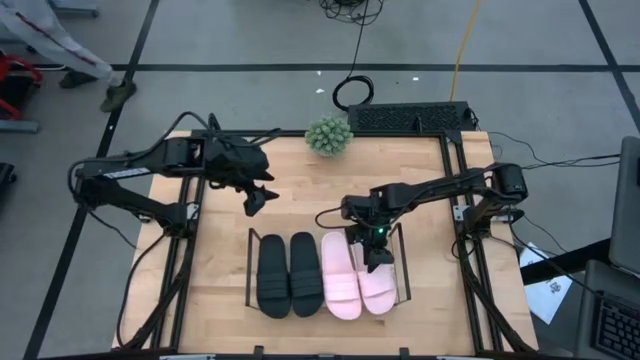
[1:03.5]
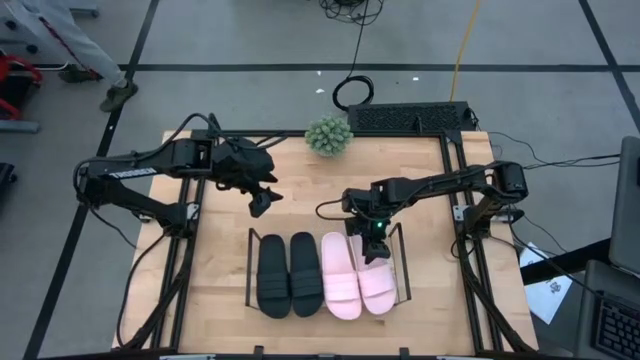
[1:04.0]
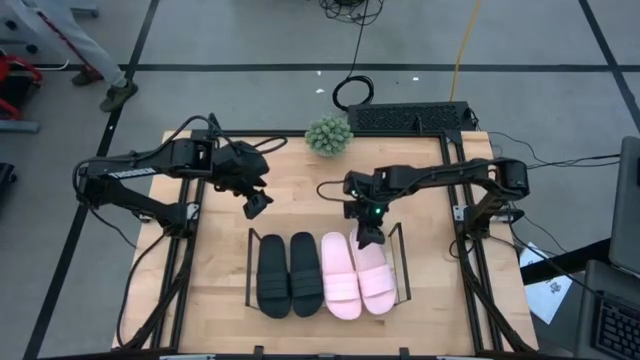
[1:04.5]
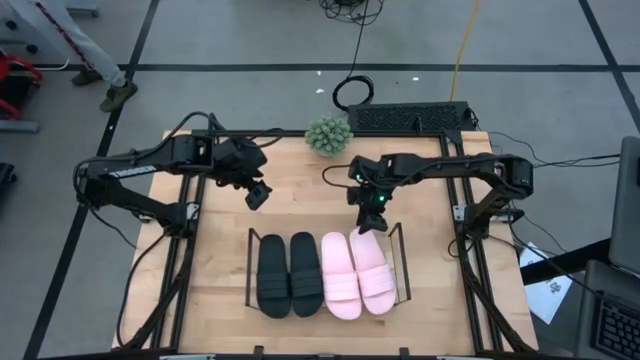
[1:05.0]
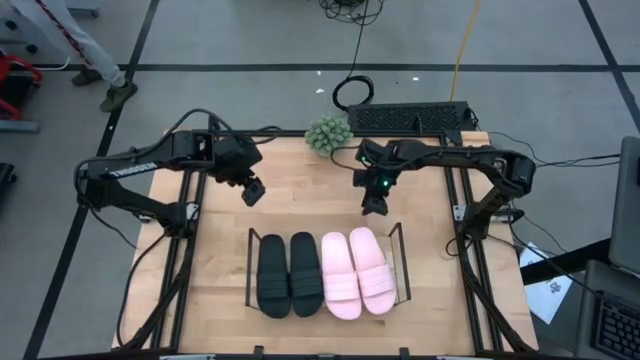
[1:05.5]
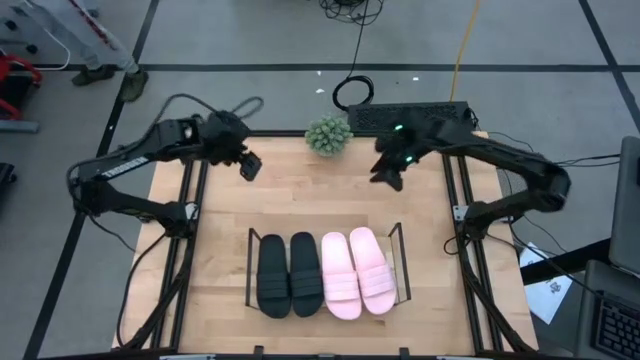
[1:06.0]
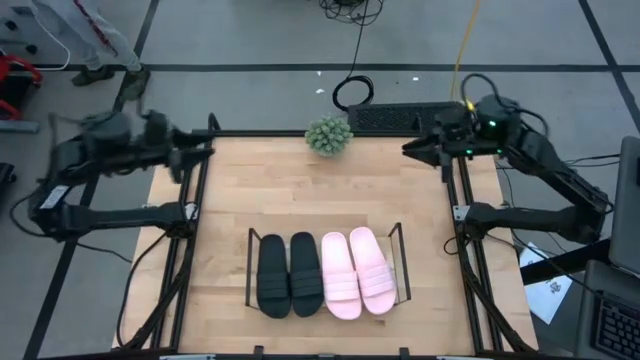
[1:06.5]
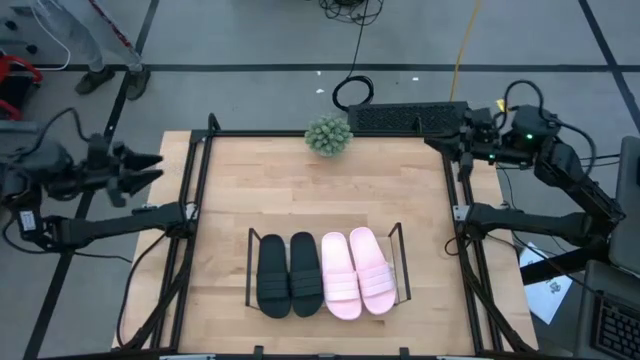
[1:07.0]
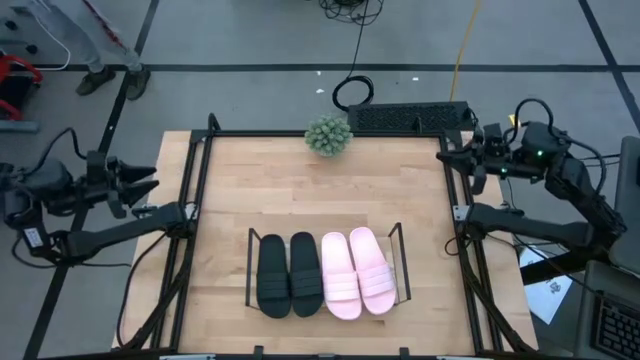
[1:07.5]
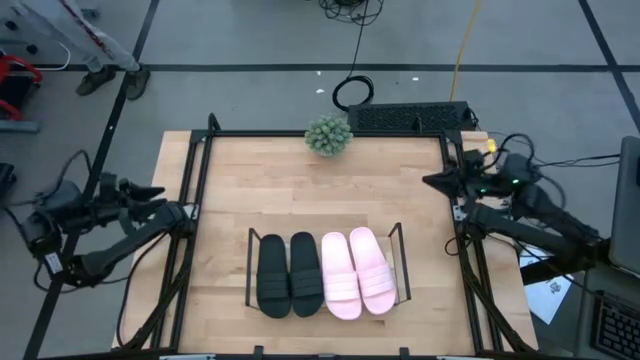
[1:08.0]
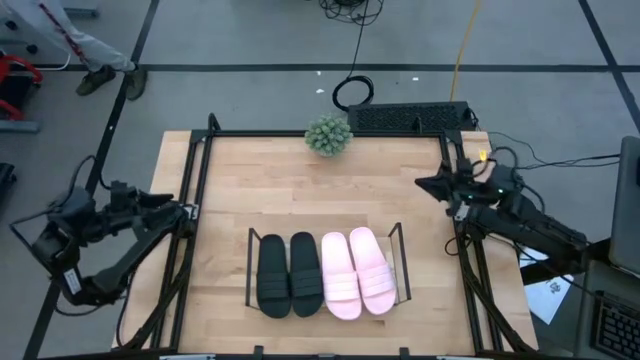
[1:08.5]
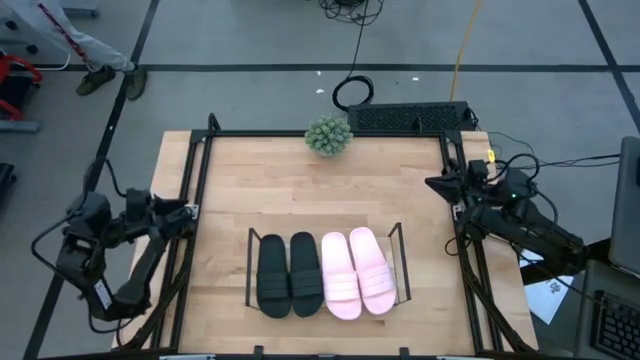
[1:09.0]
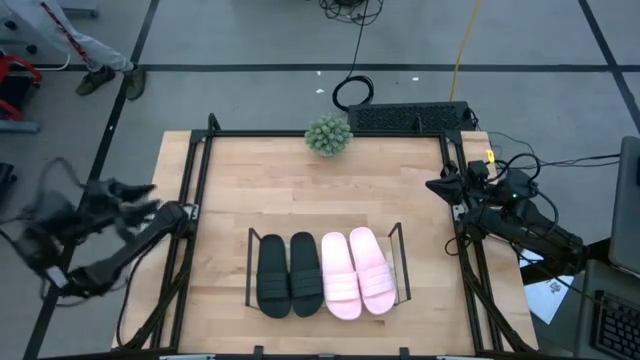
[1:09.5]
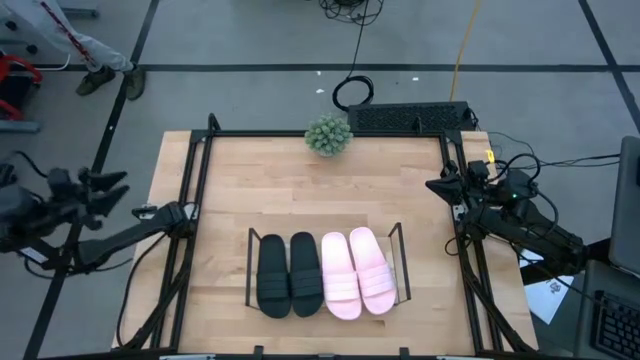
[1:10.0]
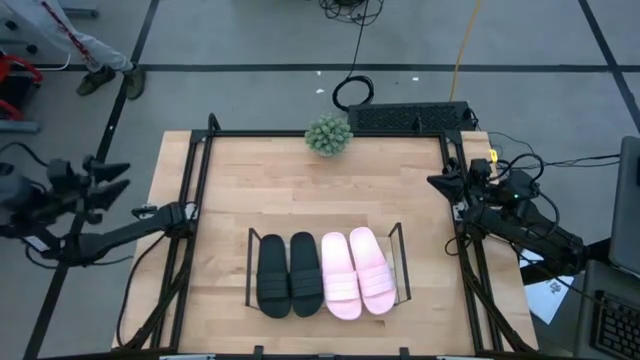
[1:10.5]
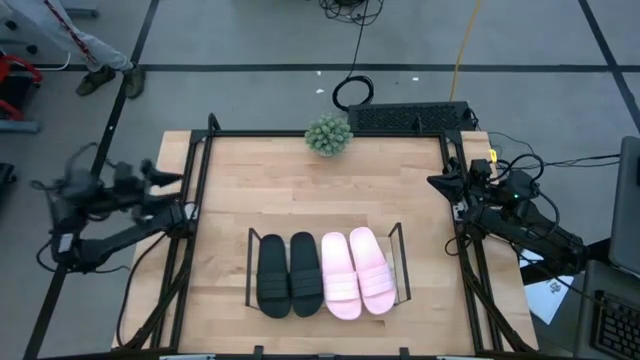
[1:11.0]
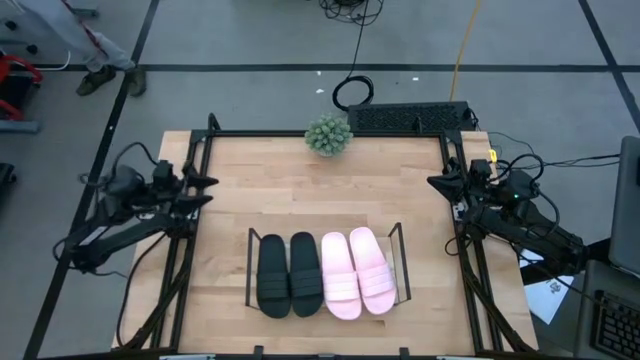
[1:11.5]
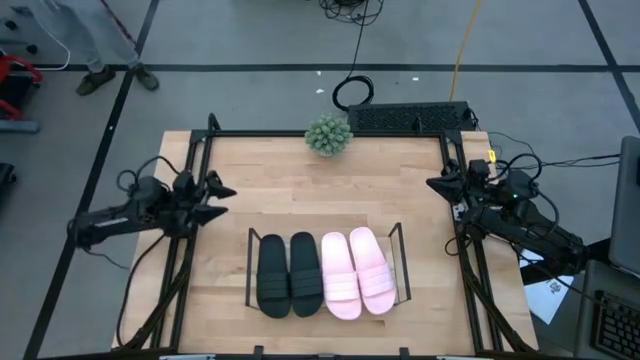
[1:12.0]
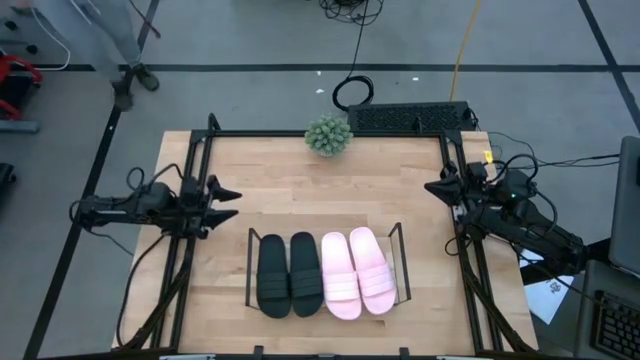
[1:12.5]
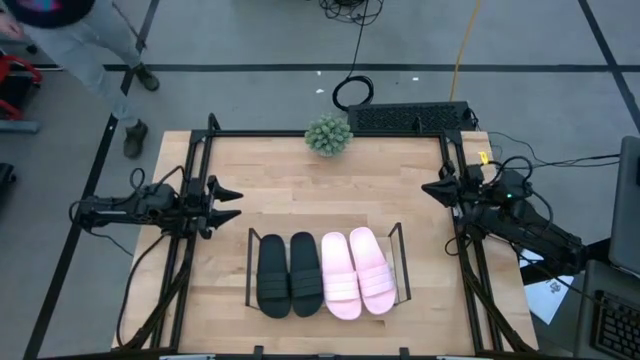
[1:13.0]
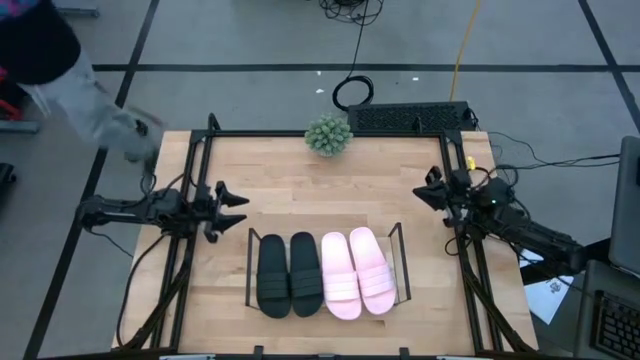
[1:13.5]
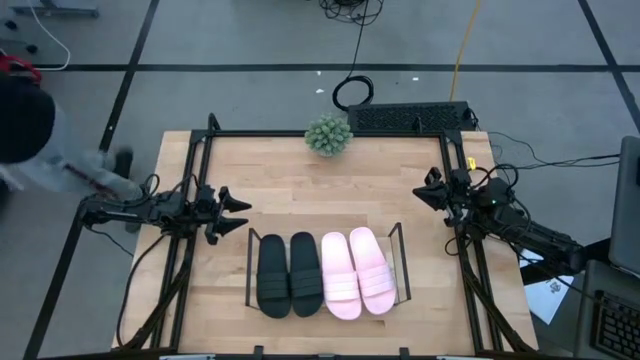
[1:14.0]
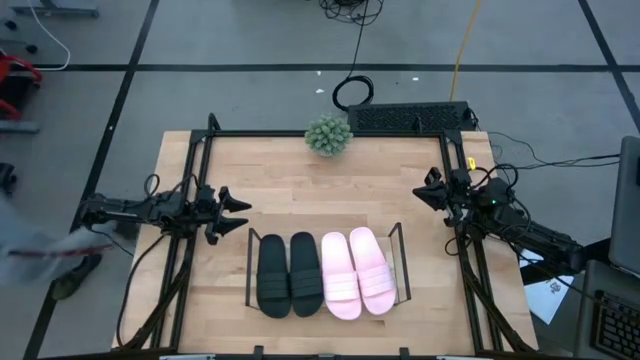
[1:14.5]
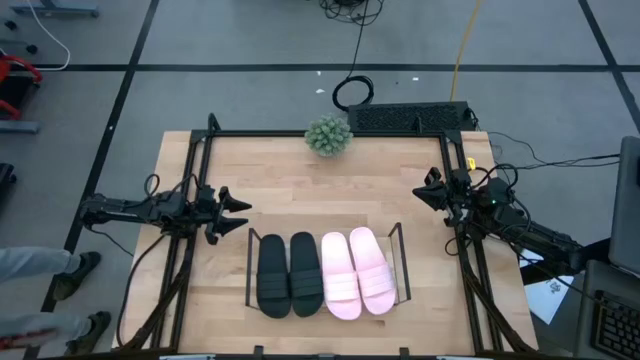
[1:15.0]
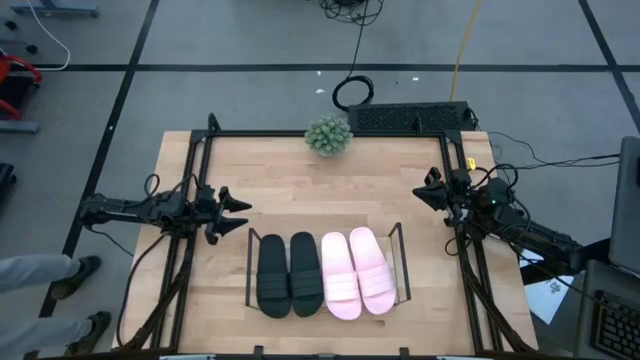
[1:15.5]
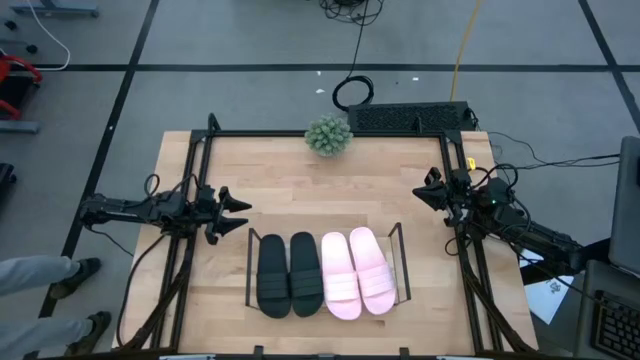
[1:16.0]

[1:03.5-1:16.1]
Task: Pick and place slides into the shelf
Return to Home Position

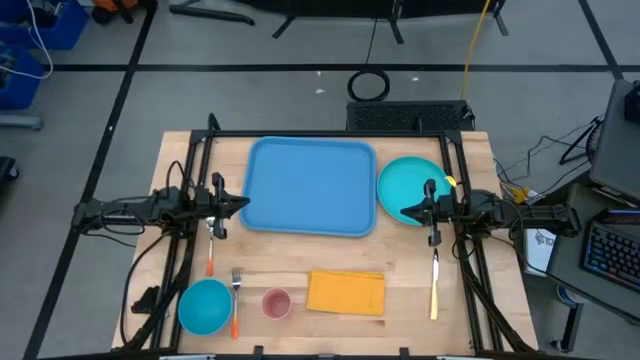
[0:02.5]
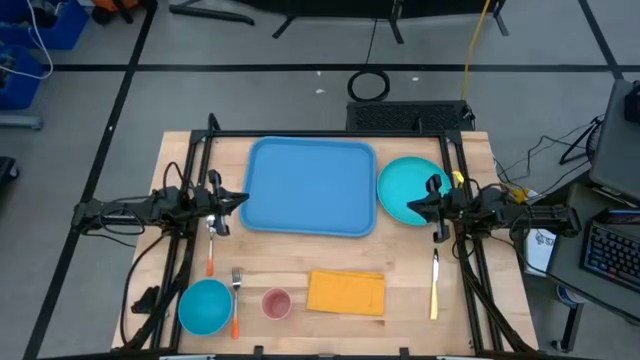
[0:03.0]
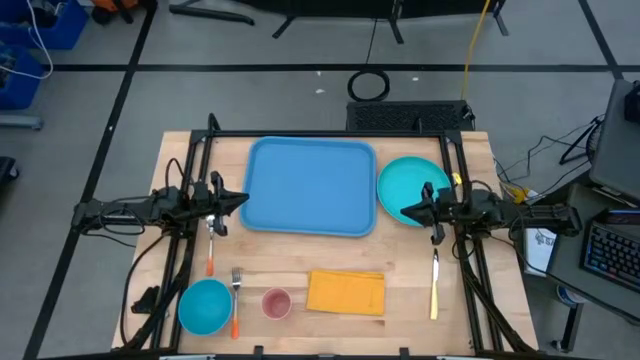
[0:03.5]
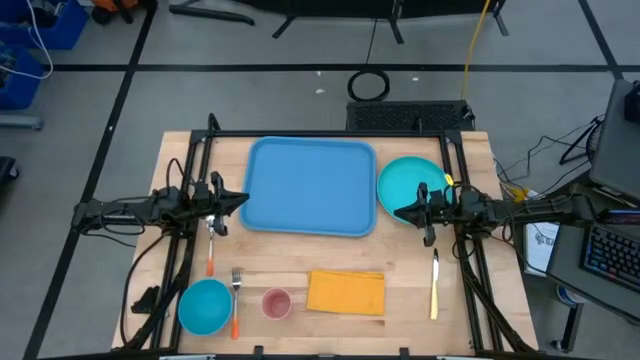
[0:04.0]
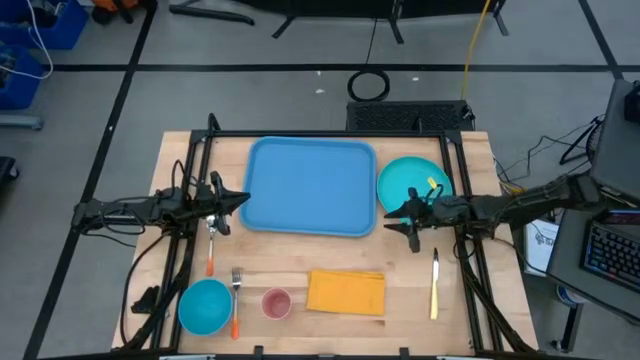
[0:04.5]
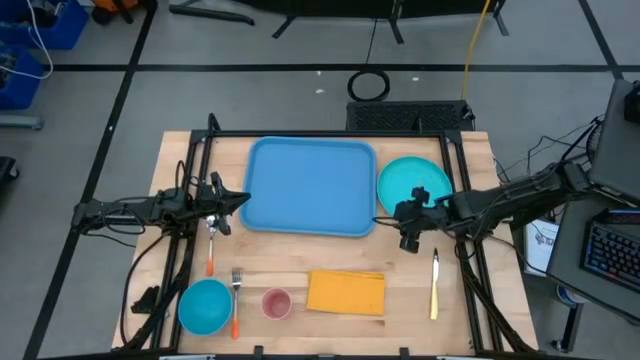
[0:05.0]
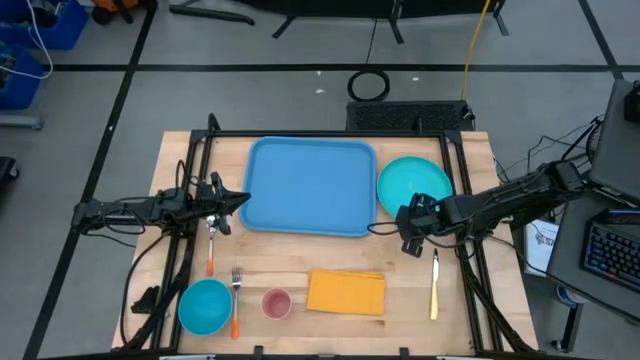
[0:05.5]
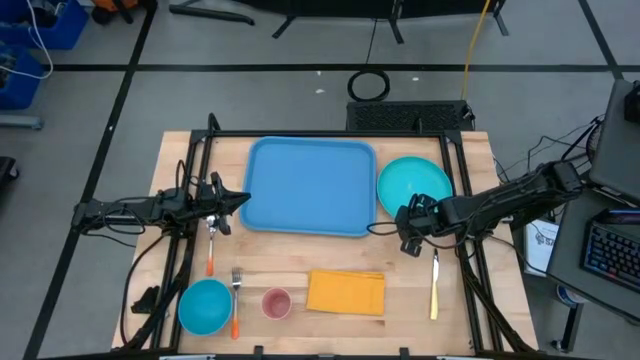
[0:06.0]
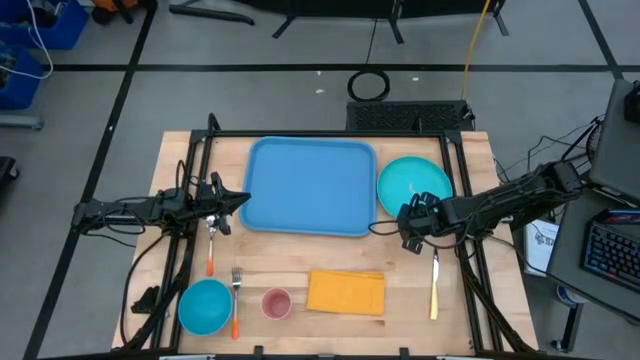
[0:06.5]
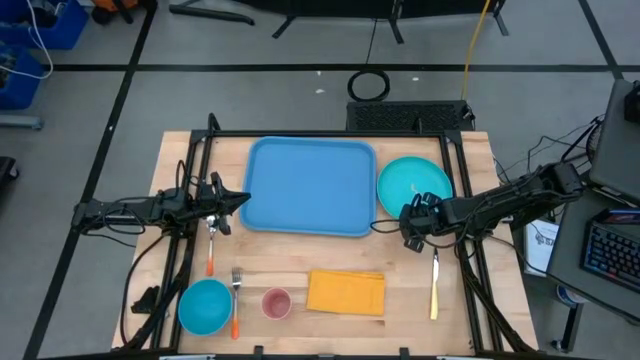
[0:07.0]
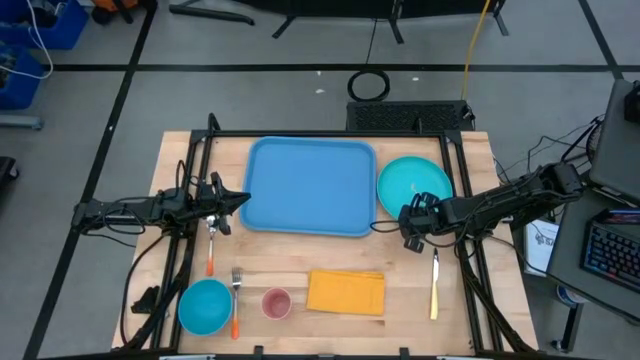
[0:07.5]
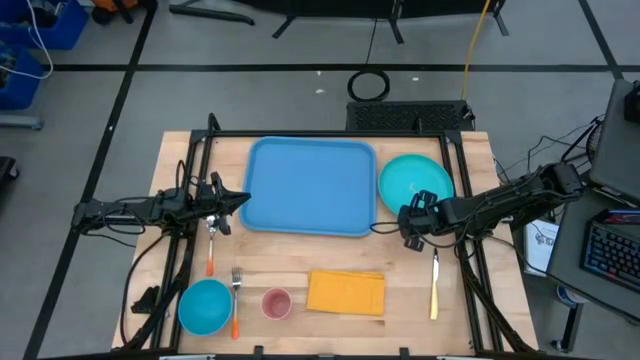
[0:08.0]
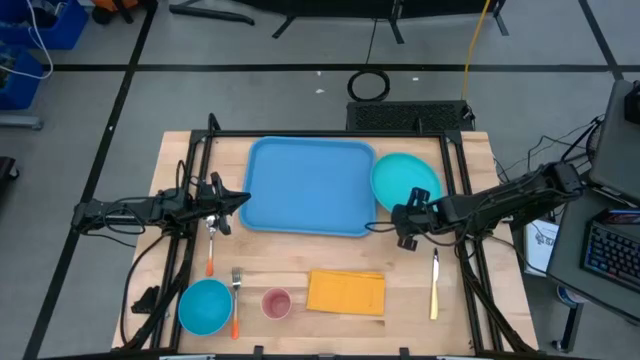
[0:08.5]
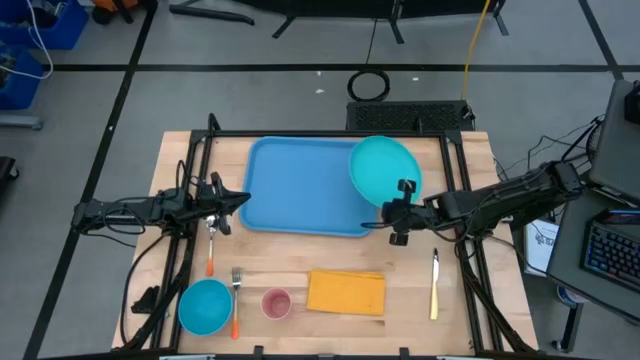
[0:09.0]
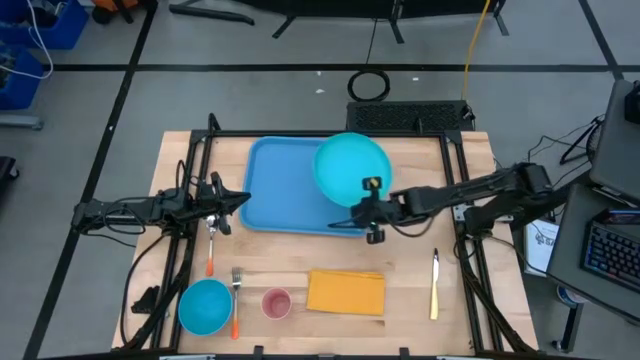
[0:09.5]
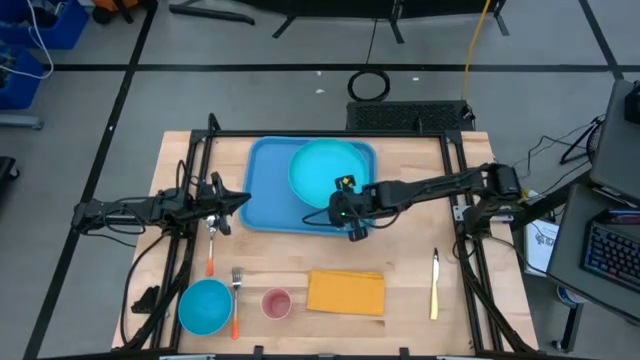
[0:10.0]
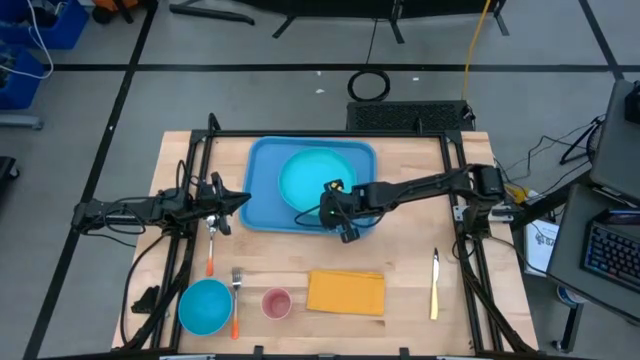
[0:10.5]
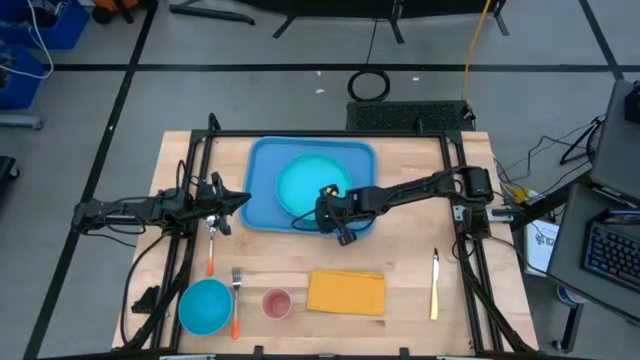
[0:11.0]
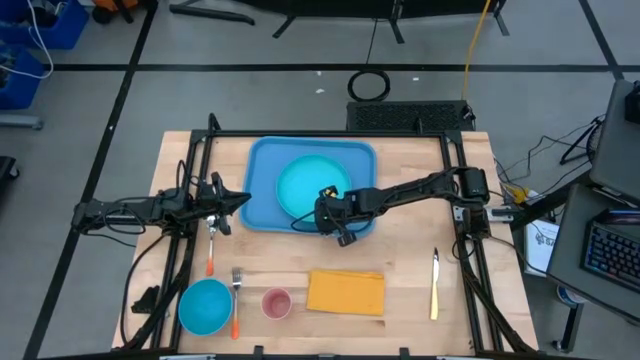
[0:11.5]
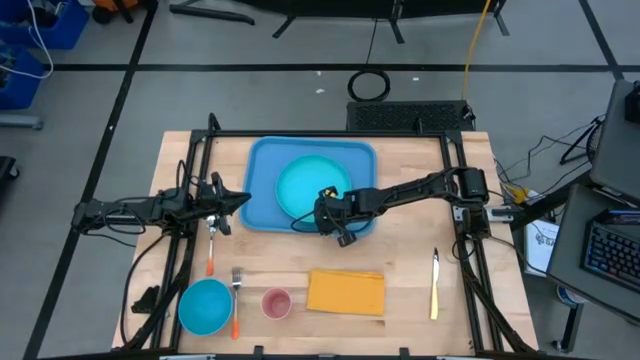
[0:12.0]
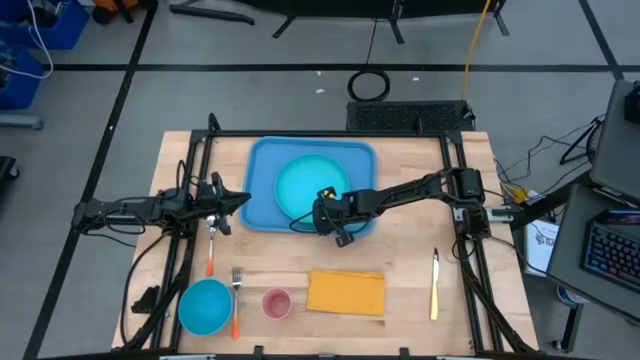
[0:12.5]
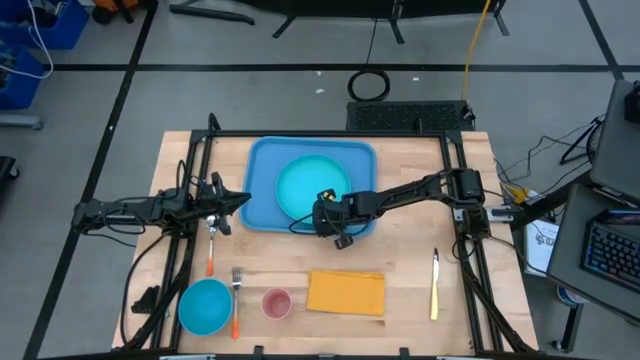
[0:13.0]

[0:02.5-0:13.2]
Task: Set up tray
Put the green plate on the blue serving tray
